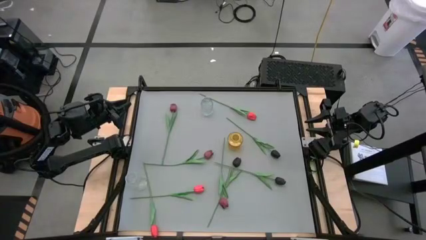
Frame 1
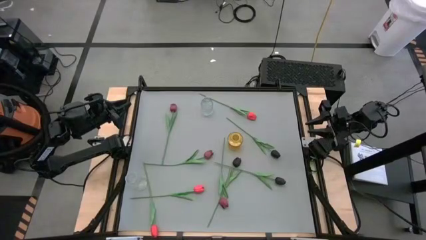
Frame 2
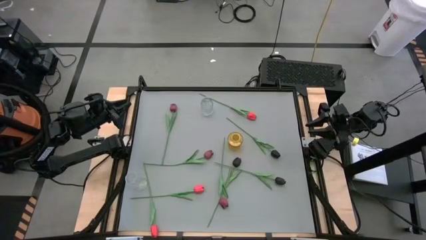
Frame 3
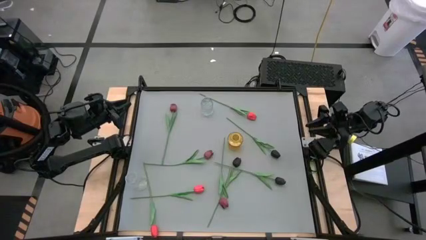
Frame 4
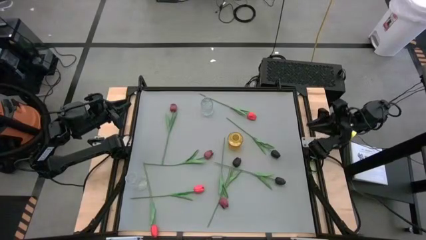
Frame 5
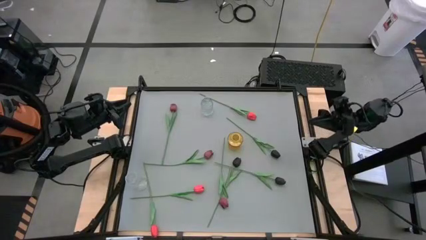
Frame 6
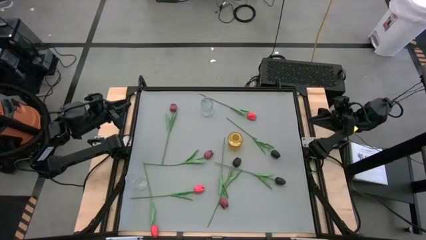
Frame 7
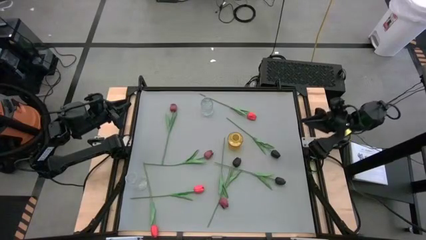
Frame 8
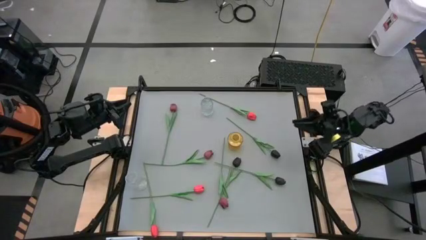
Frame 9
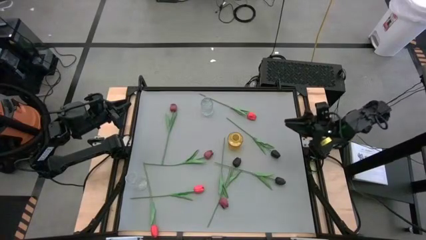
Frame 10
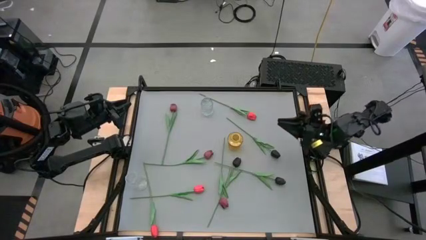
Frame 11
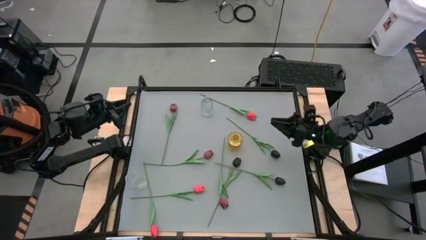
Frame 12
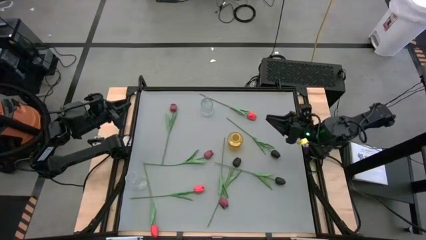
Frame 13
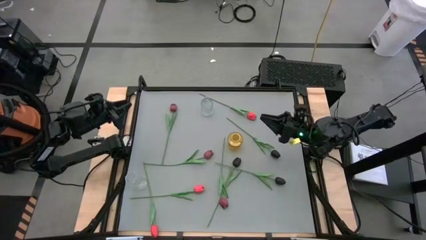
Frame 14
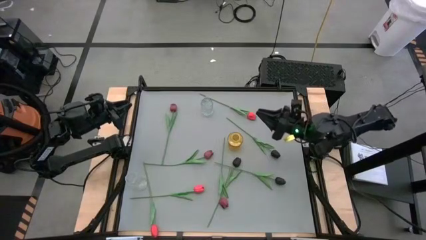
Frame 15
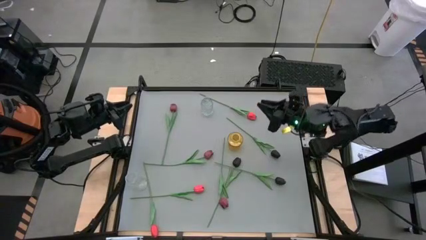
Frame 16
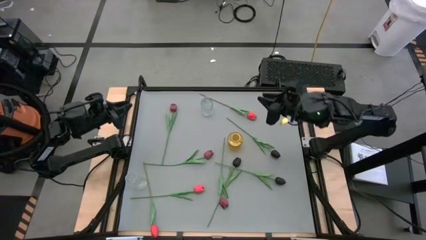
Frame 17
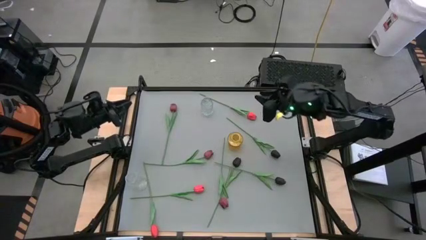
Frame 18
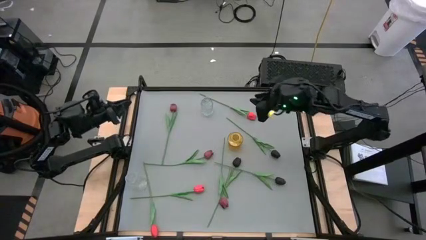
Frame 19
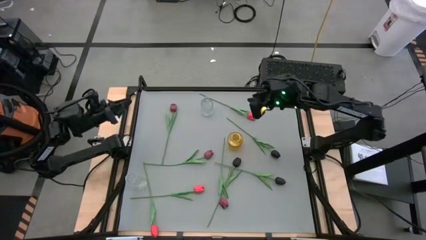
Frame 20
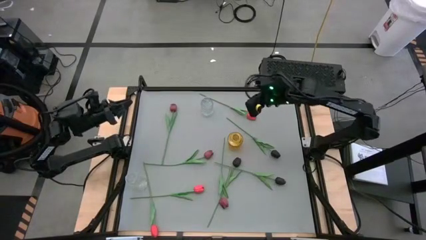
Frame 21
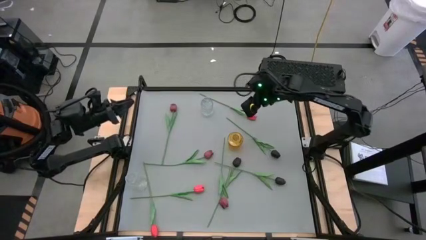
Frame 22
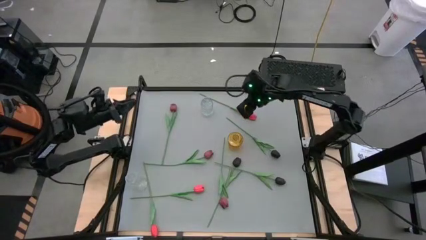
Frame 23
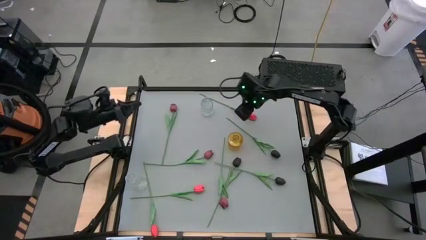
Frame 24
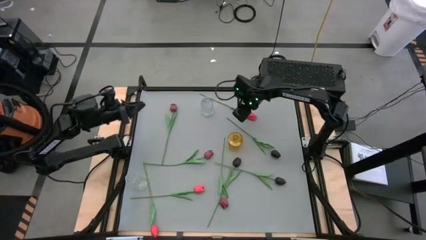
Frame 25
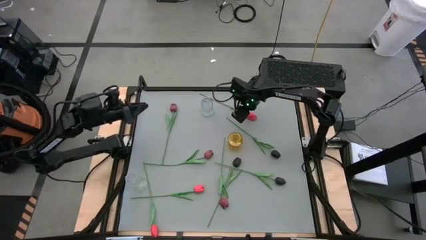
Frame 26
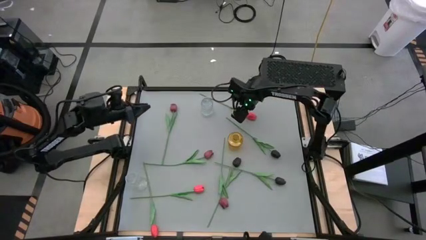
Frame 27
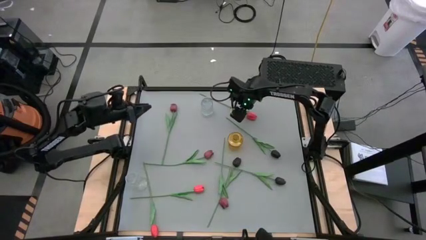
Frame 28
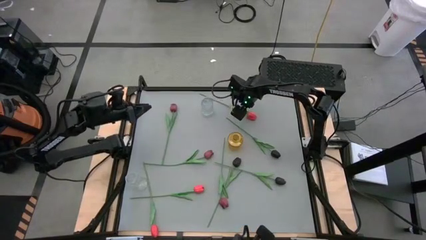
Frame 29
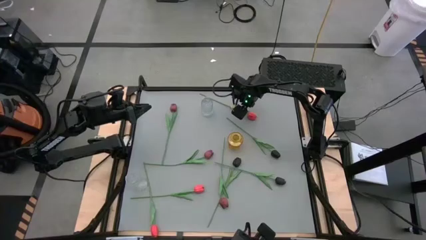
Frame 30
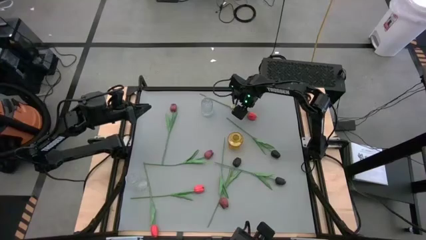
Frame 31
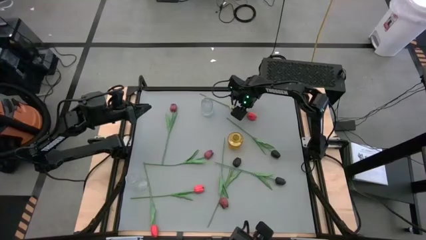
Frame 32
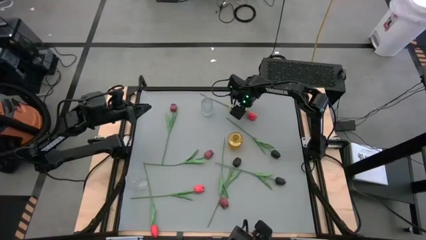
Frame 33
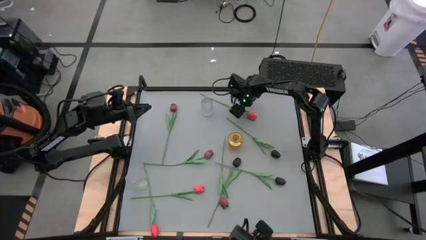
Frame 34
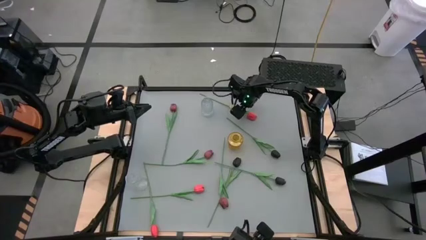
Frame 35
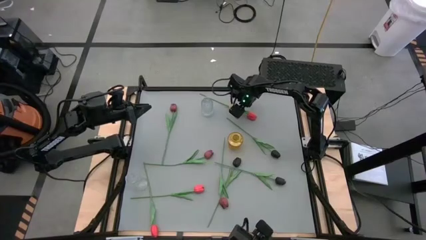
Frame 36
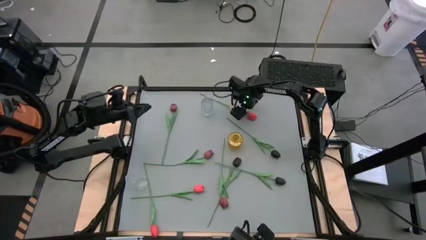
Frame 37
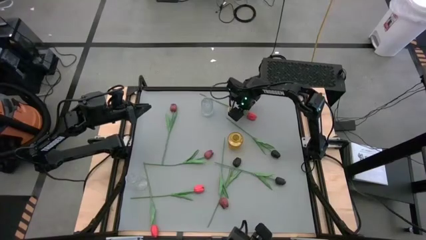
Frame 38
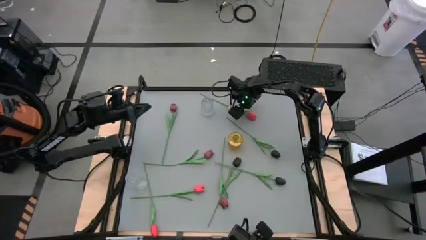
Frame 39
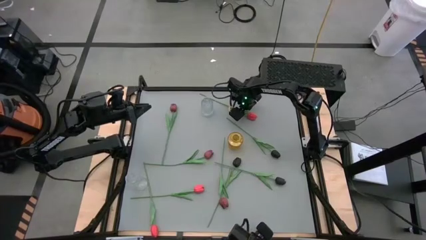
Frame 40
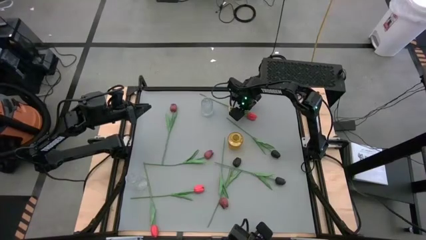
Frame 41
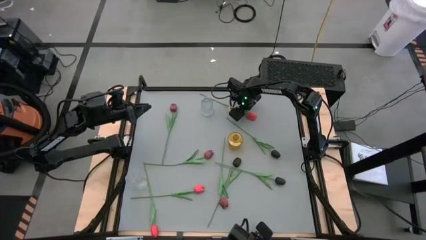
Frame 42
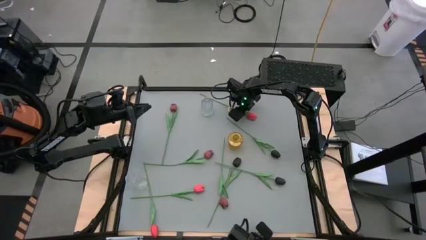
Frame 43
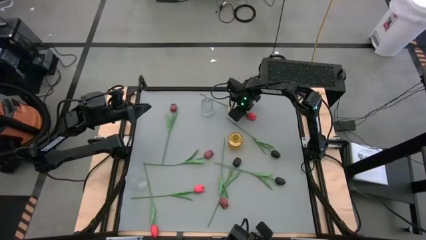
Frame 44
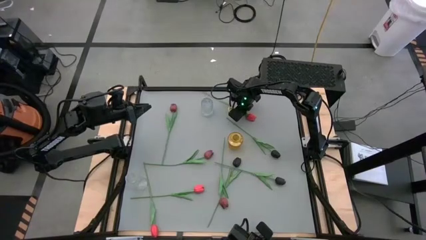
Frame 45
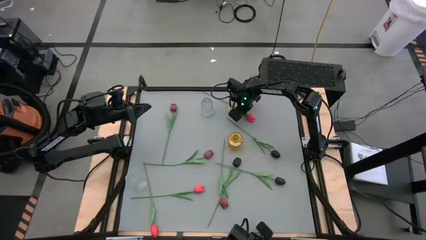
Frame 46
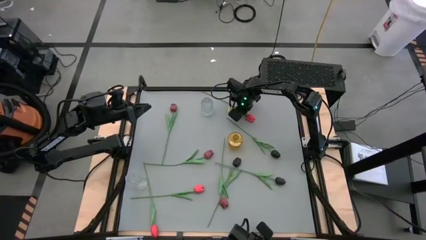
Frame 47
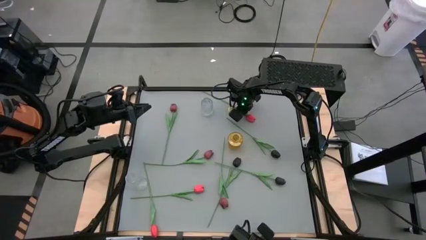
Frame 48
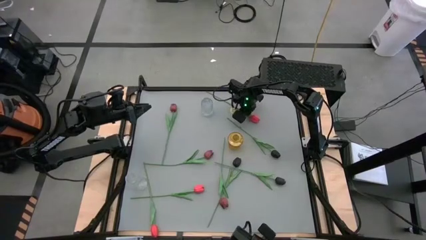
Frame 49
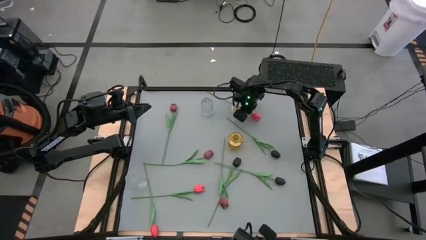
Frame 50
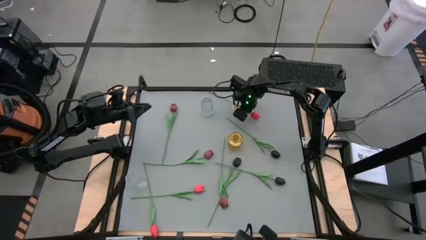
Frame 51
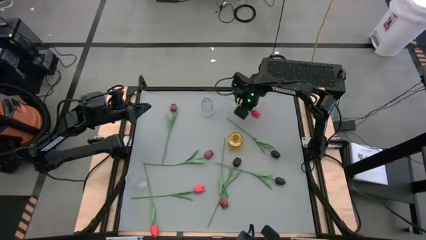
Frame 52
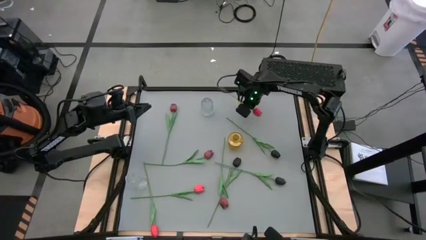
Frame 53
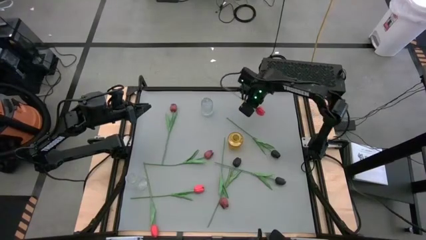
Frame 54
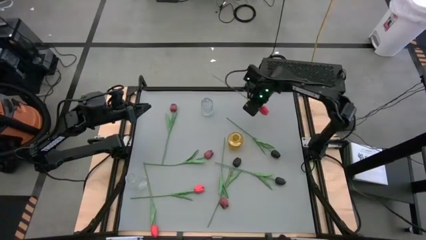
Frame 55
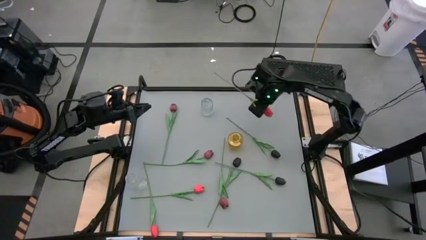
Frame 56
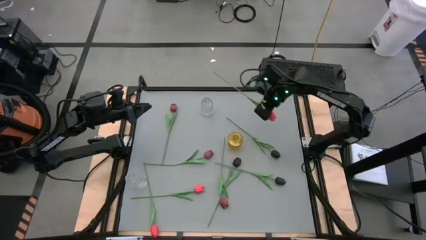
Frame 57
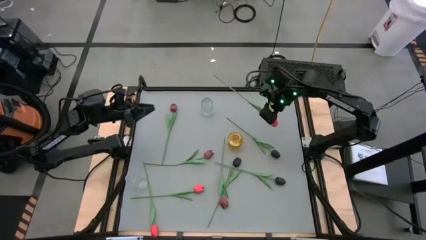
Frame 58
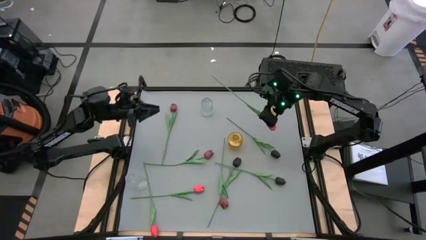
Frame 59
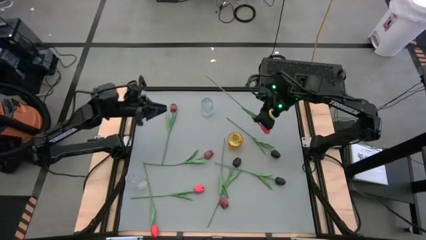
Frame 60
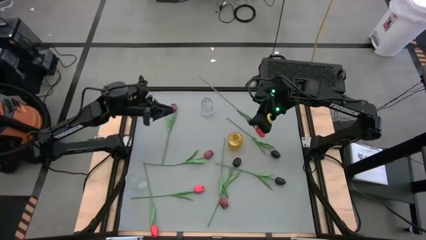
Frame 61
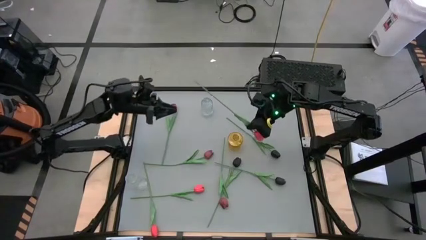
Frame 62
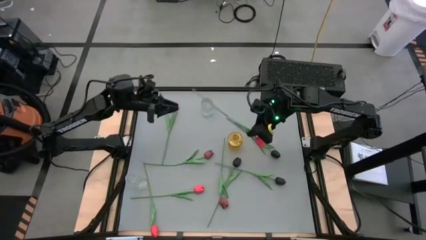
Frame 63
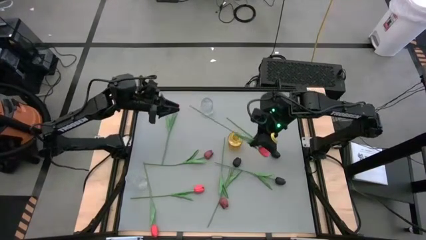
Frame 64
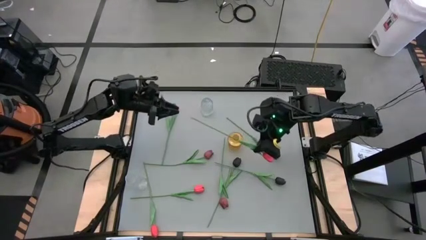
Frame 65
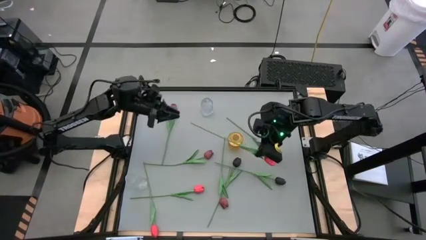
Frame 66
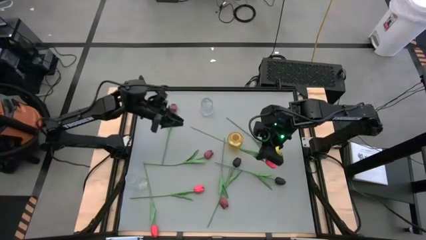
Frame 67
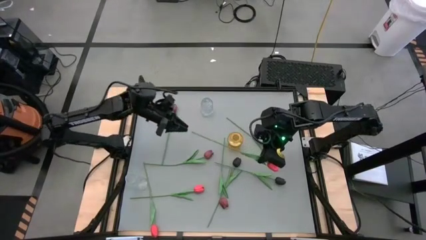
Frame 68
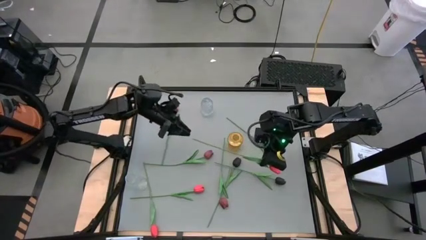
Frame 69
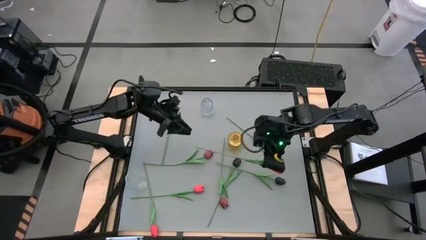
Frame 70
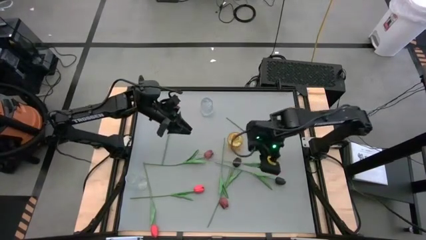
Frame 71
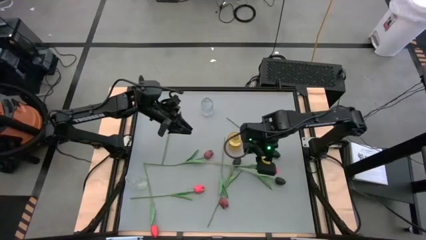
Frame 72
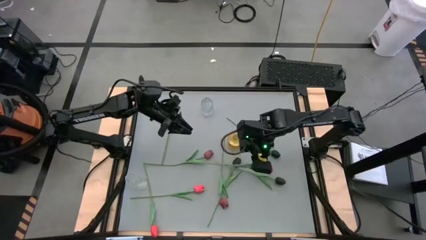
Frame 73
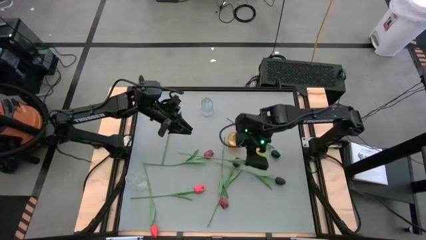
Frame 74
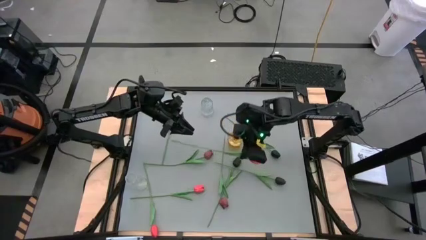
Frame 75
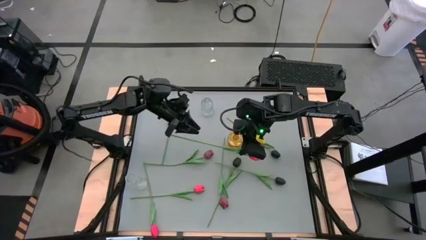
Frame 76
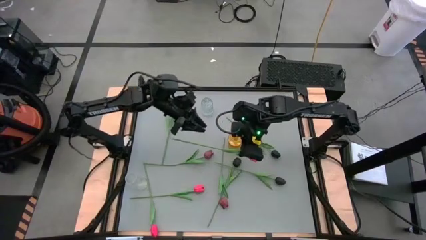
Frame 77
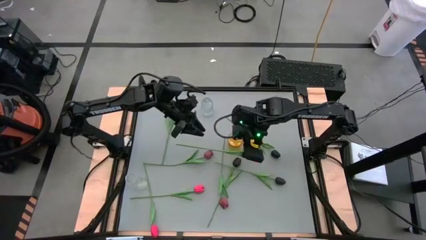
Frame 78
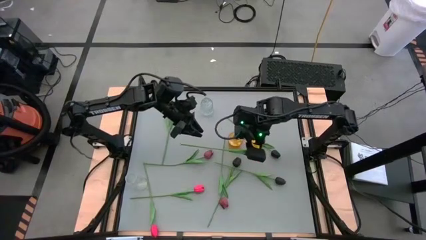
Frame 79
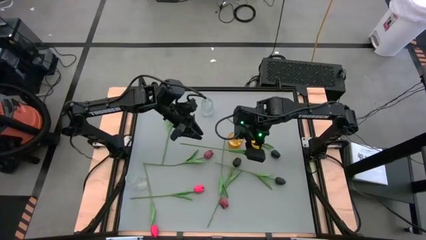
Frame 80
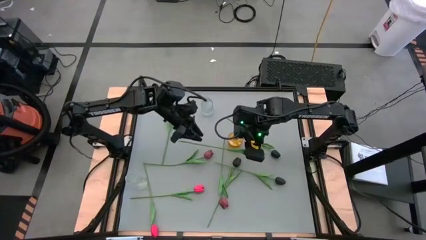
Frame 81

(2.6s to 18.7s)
Task: Sort flowers into vase by color
Put the top pink tulip into the yellow vase
